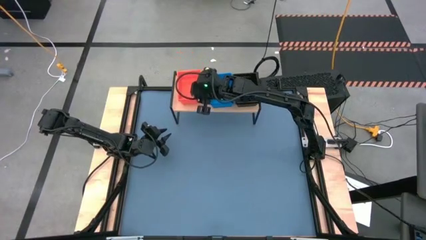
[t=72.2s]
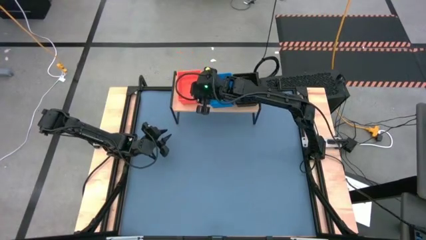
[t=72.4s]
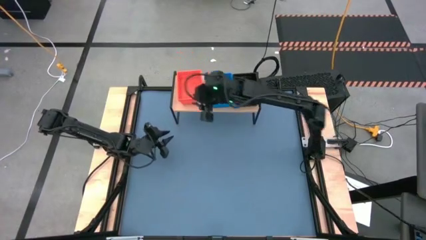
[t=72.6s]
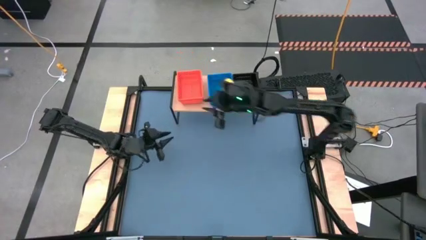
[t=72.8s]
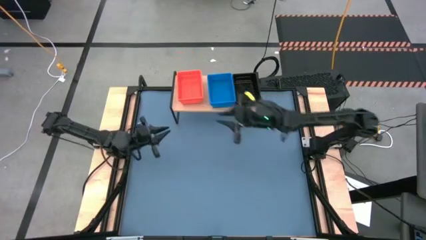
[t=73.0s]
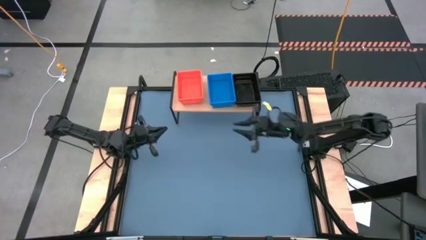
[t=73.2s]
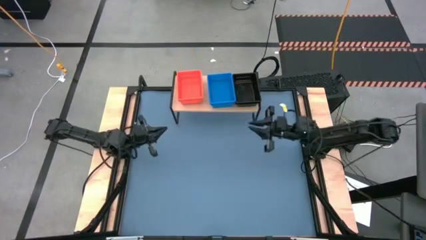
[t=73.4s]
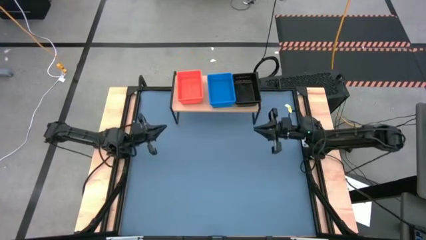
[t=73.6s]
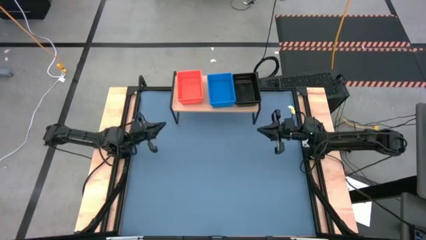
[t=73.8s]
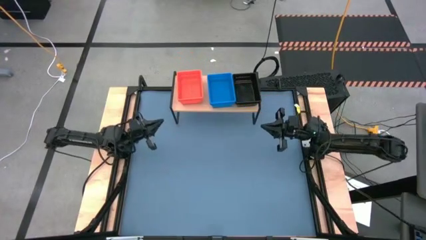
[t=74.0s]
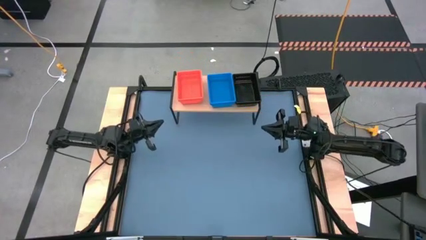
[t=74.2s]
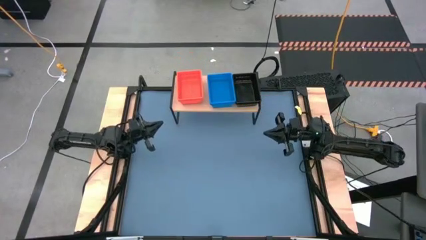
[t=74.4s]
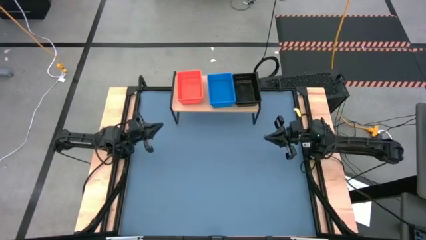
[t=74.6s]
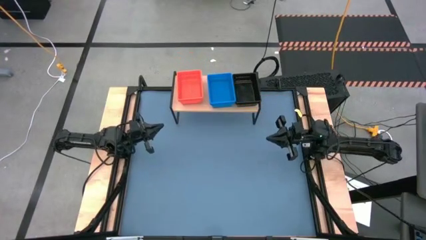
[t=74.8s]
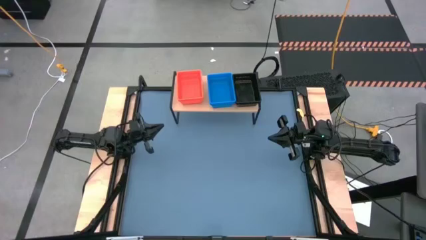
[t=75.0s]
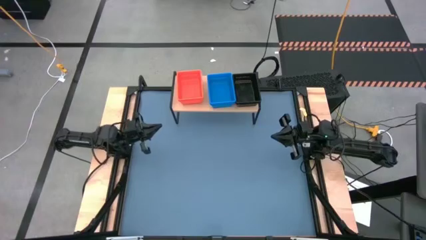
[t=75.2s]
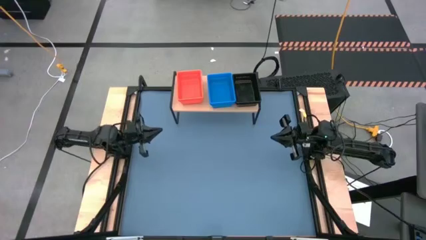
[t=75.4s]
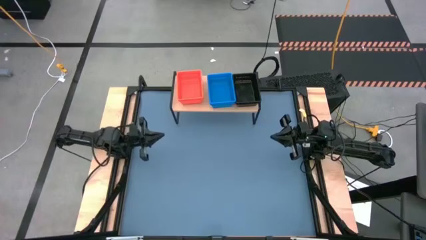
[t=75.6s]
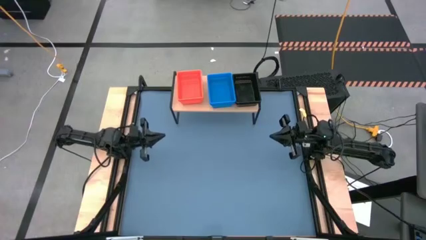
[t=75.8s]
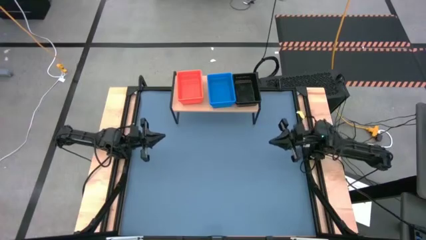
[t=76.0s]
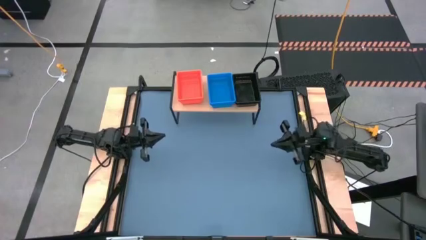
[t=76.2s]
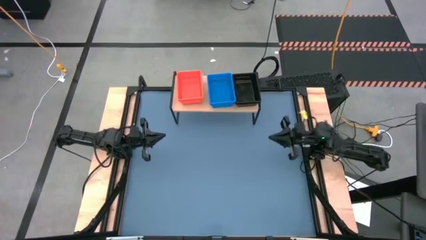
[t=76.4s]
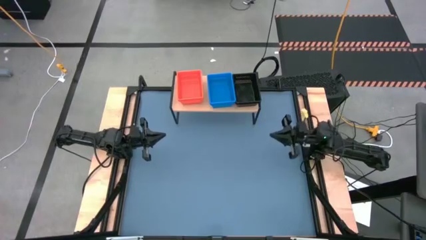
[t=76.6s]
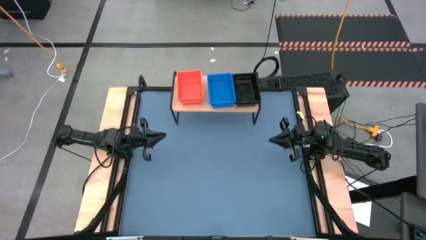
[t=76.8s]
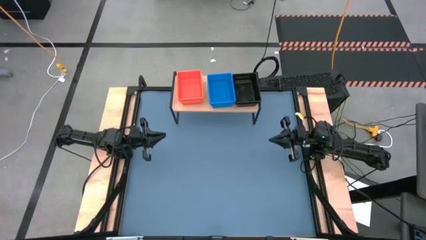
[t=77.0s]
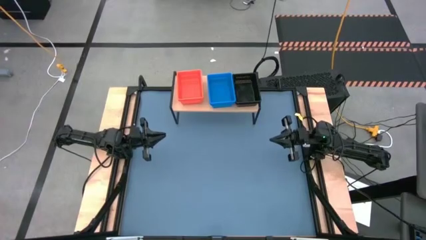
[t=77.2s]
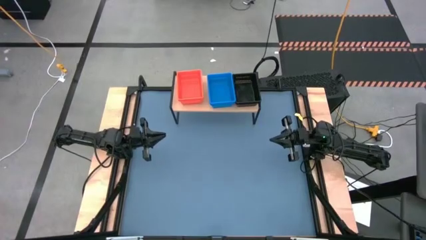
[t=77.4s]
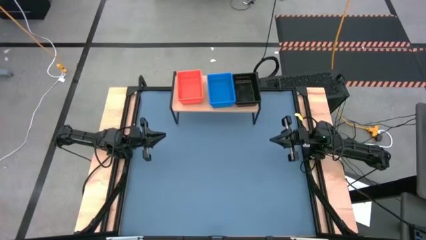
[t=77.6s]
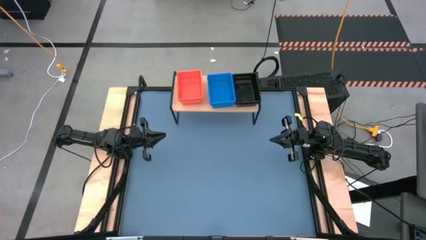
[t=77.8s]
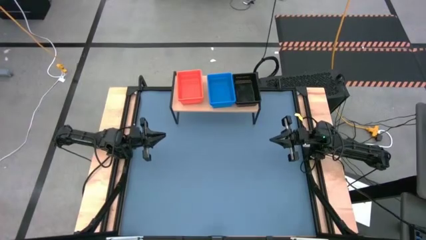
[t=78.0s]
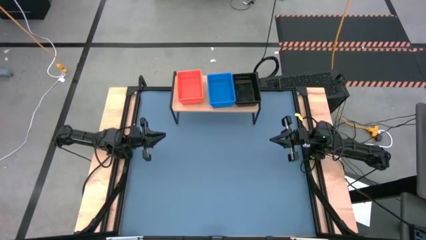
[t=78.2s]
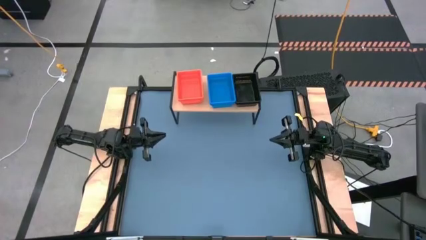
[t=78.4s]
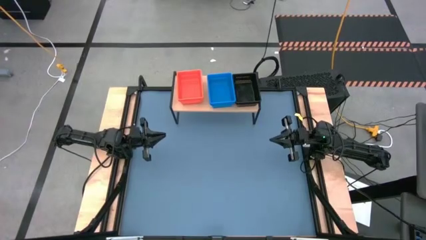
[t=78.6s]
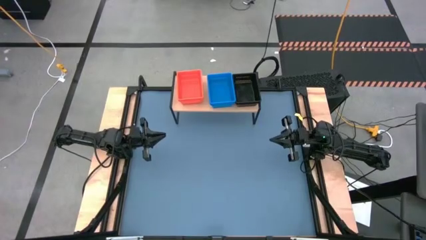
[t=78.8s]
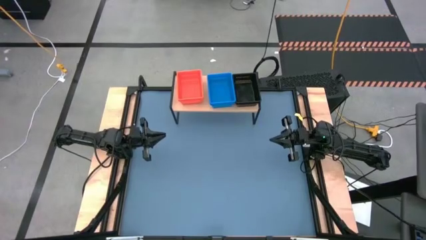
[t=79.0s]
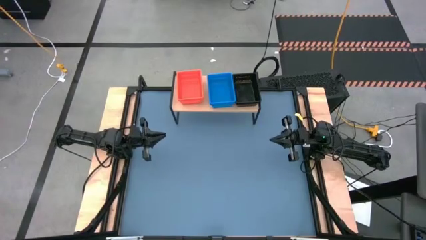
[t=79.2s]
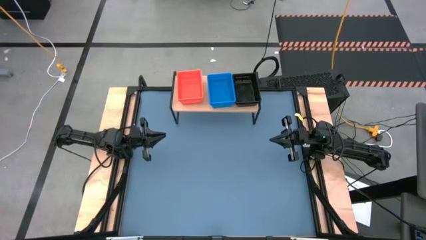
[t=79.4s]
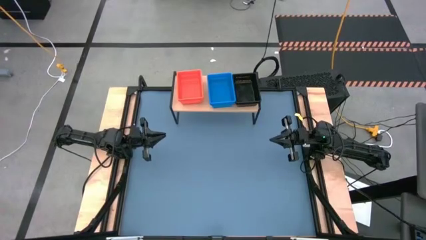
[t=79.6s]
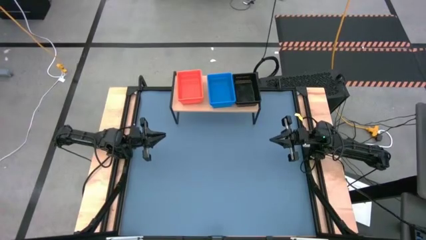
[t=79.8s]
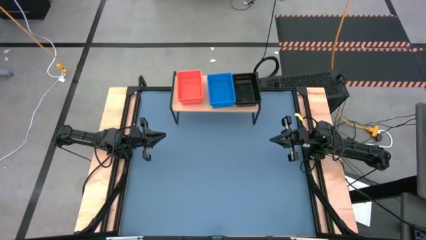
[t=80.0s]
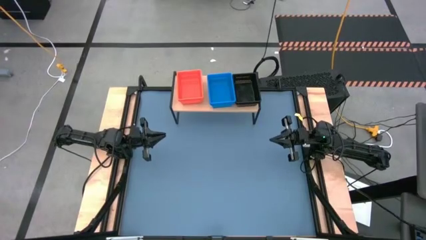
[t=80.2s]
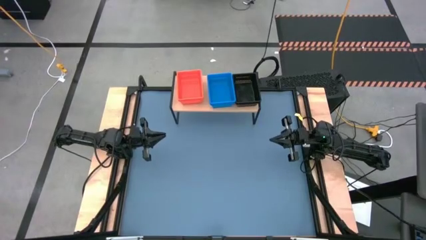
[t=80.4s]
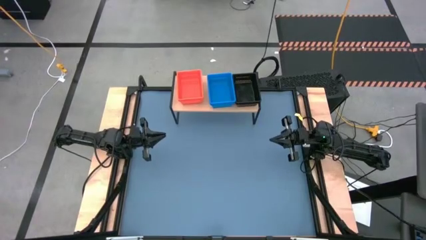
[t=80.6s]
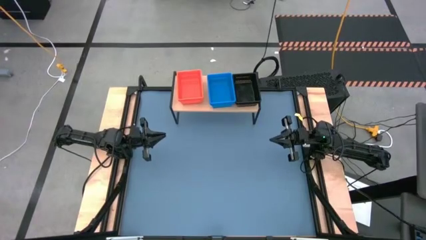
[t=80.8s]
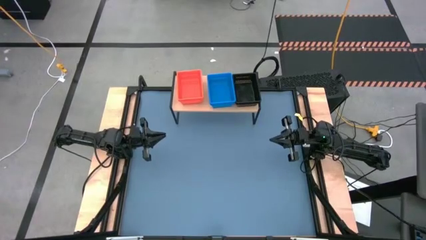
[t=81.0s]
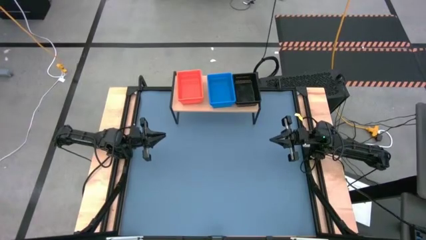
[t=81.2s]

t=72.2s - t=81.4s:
Task: Stack baskets on shelf by color
Return to Home Position

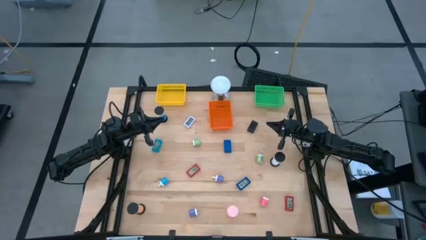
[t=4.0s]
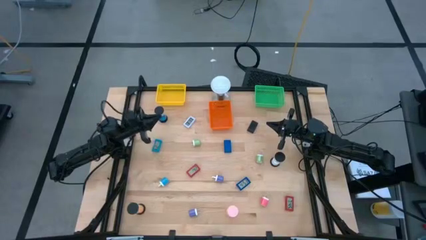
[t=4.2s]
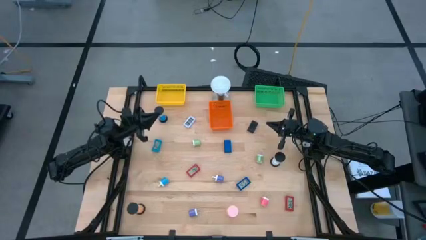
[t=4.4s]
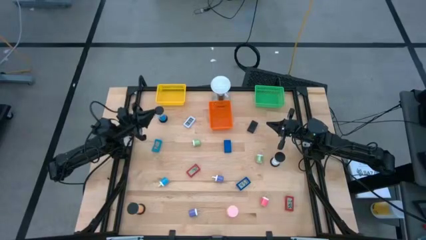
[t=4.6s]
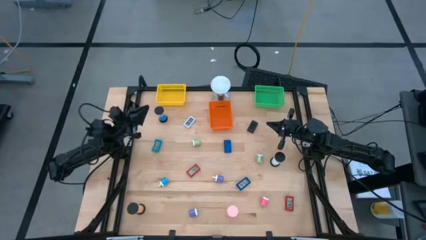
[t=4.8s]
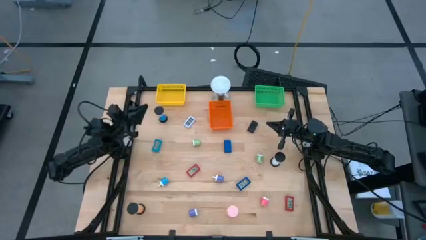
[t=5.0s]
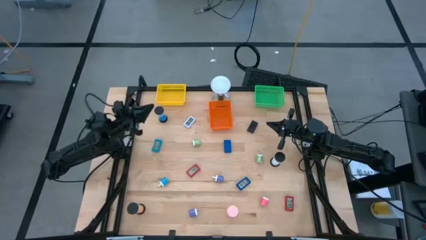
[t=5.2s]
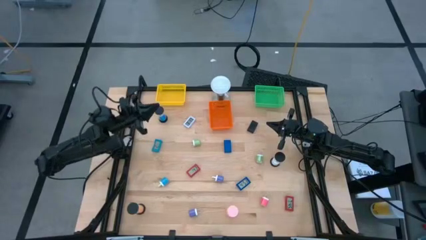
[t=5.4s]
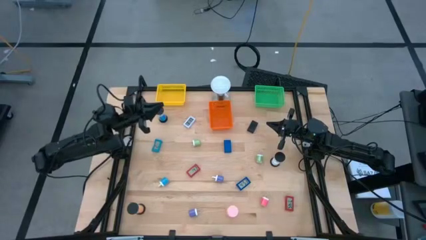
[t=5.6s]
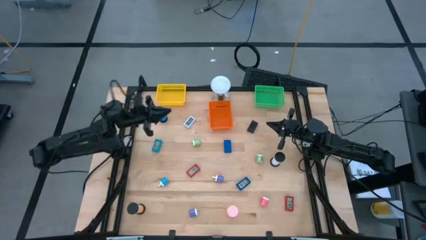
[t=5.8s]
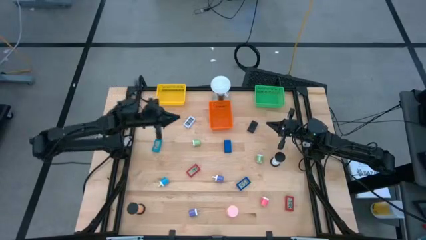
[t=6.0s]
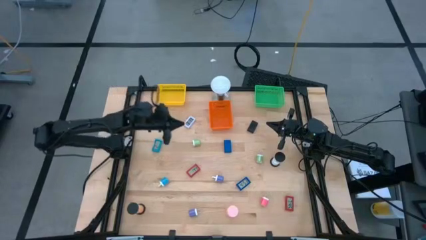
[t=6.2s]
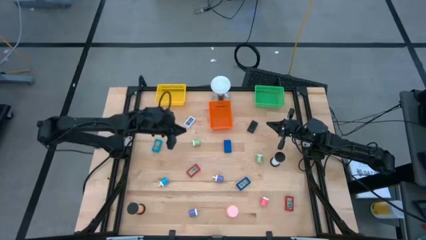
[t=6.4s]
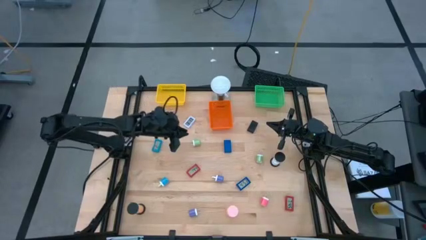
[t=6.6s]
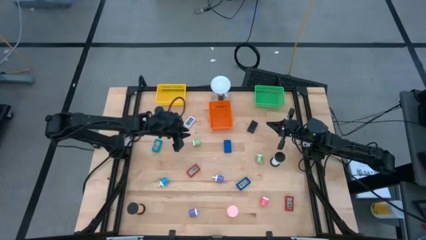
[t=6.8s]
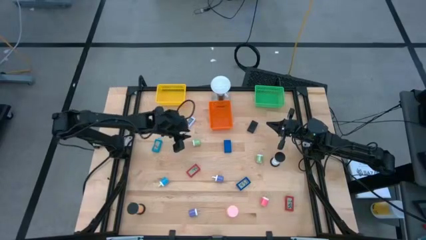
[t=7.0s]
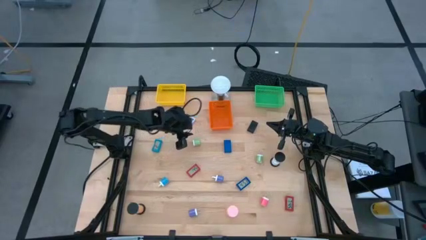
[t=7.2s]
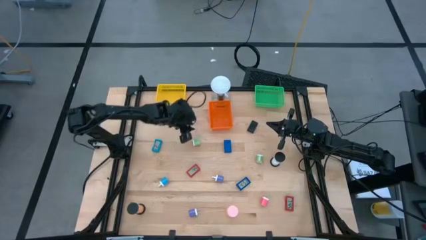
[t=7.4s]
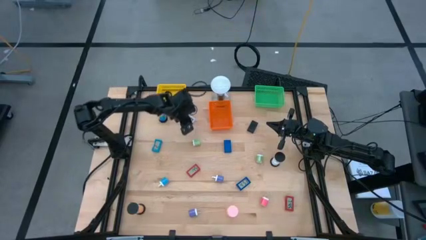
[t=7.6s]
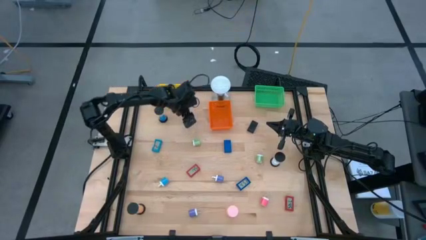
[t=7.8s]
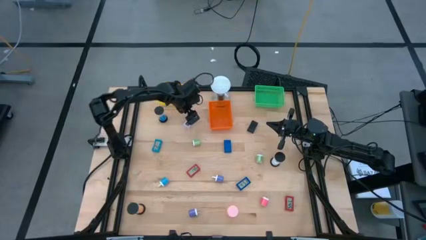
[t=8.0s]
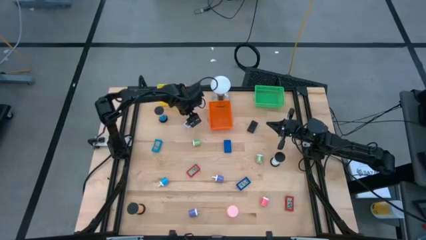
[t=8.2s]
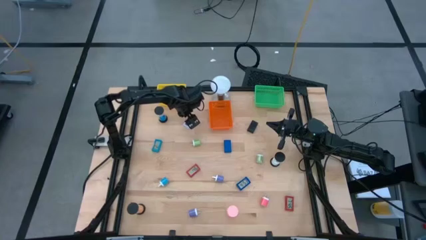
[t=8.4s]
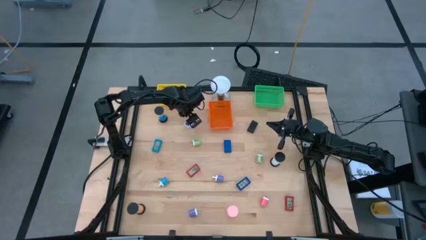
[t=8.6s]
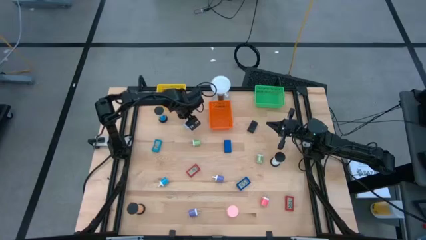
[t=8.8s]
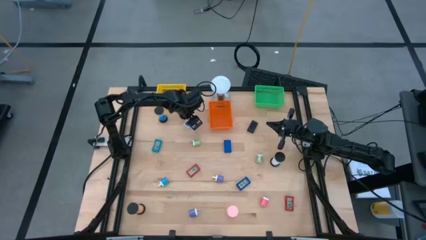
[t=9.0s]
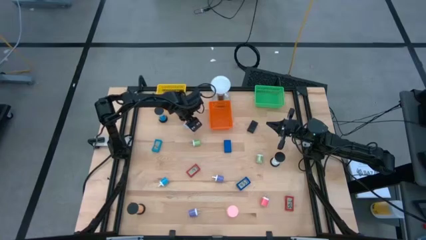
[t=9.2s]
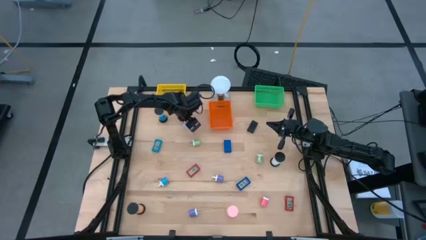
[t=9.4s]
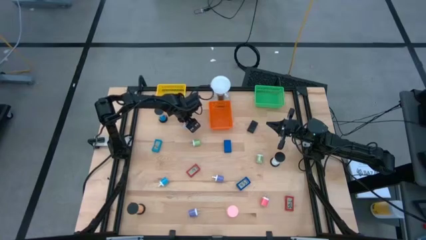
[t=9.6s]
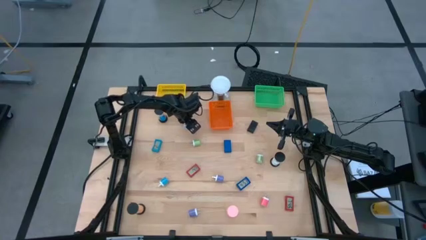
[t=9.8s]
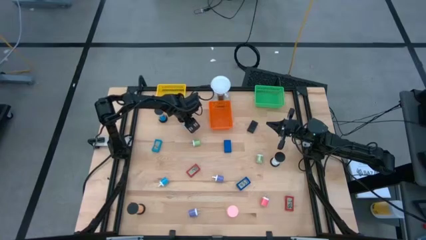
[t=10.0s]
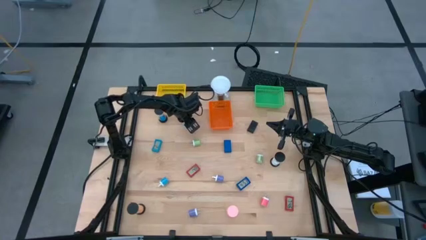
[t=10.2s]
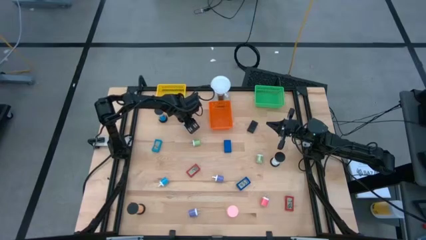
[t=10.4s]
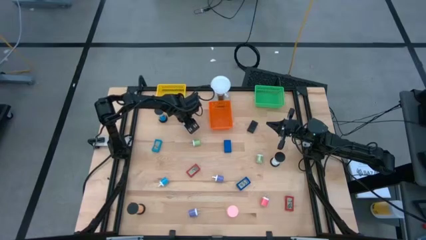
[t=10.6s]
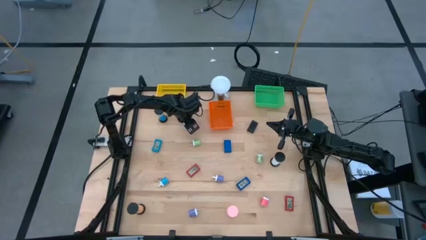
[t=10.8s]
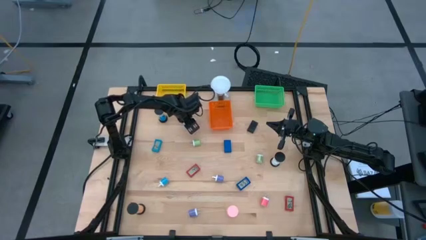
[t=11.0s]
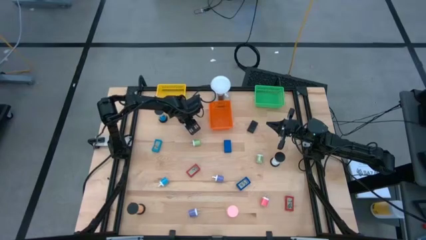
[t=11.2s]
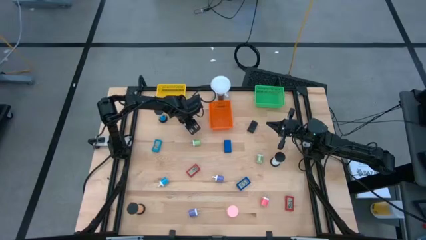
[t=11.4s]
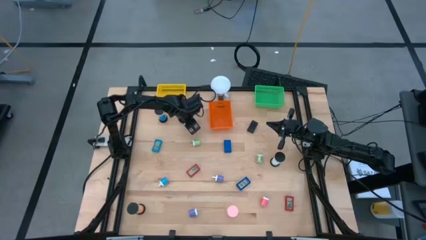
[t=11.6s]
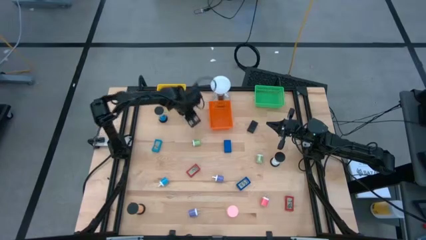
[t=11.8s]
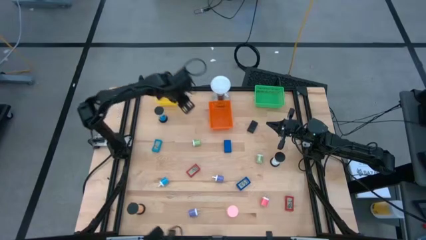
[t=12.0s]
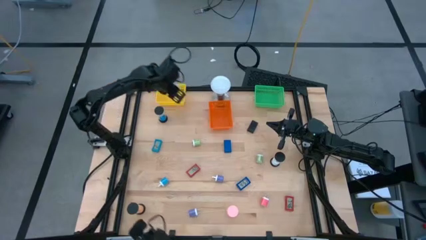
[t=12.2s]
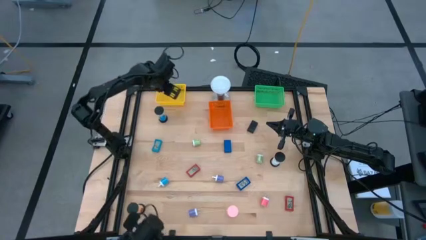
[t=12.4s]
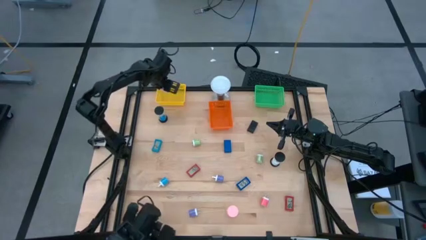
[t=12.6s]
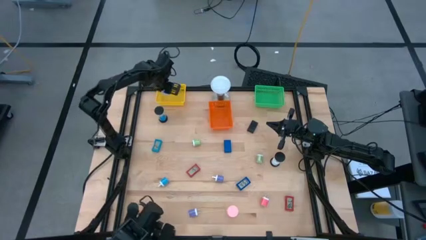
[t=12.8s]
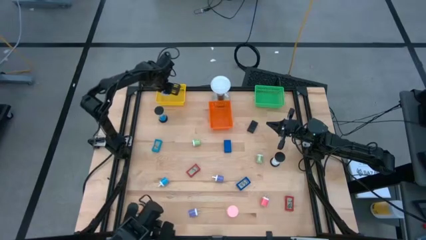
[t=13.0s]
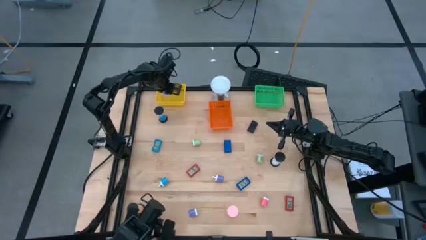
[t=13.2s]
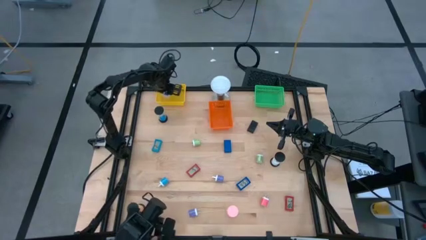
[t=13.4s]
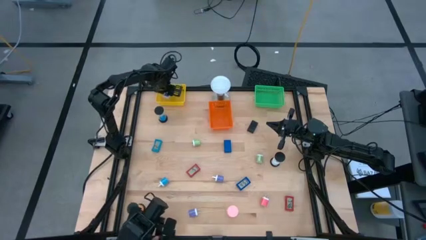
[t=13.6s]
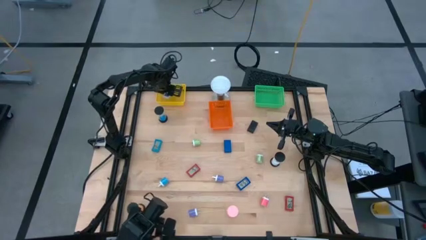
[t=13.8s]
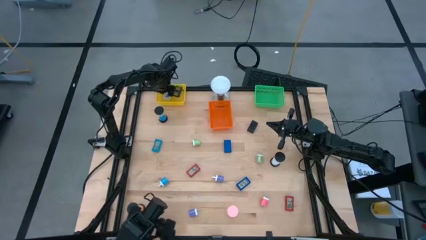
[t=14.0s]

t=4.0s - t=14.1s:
Task: Pick & Place Office items
Put the white digital clock into the yellow bin
